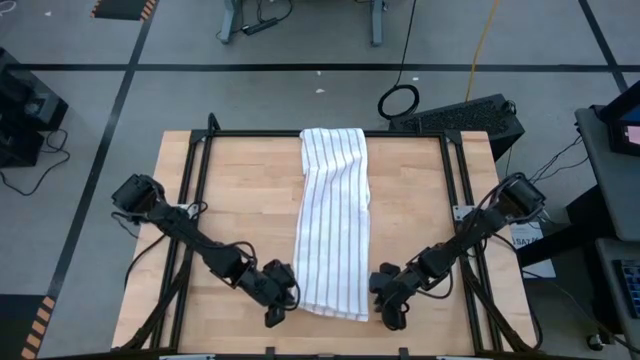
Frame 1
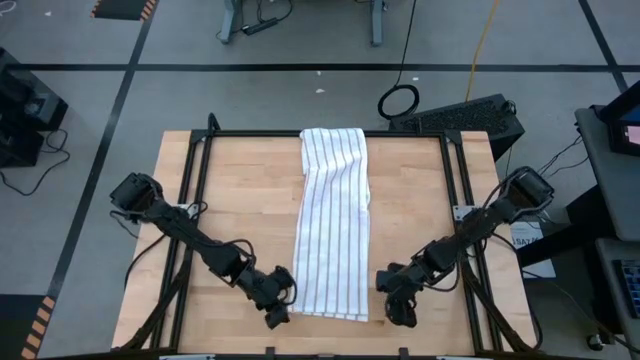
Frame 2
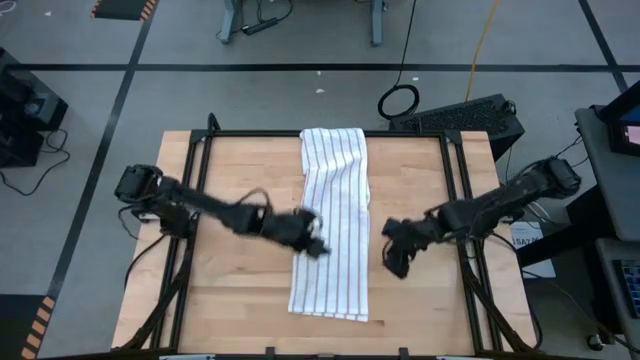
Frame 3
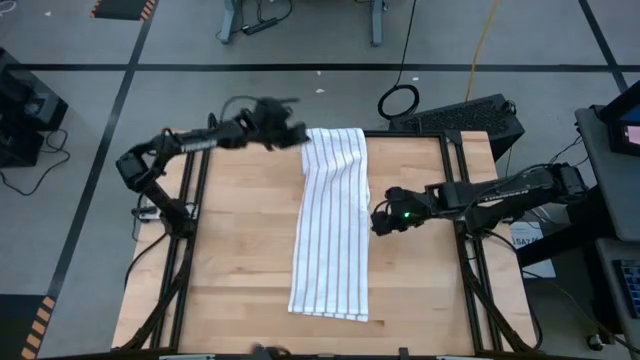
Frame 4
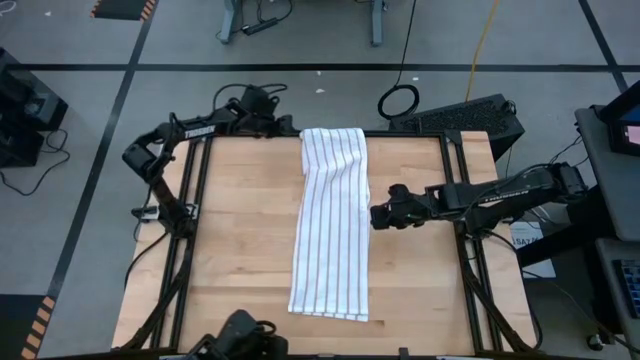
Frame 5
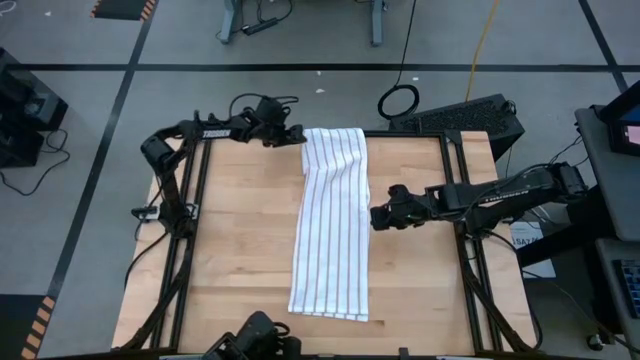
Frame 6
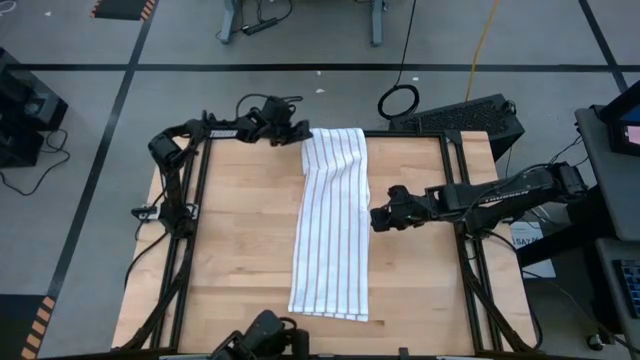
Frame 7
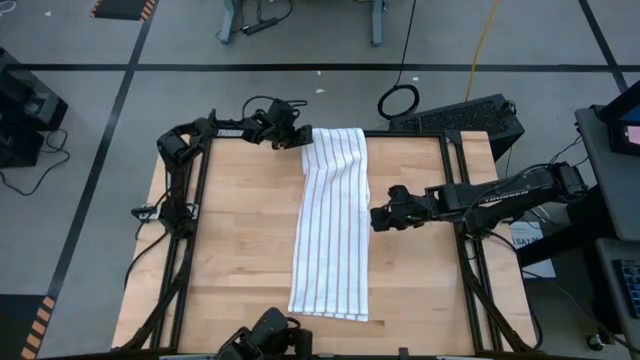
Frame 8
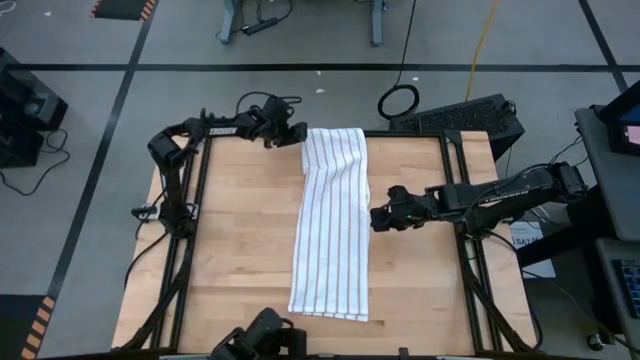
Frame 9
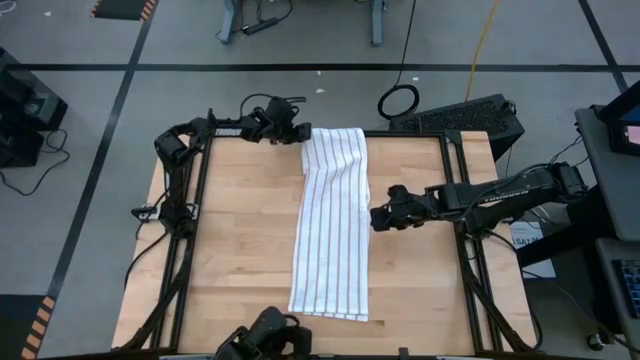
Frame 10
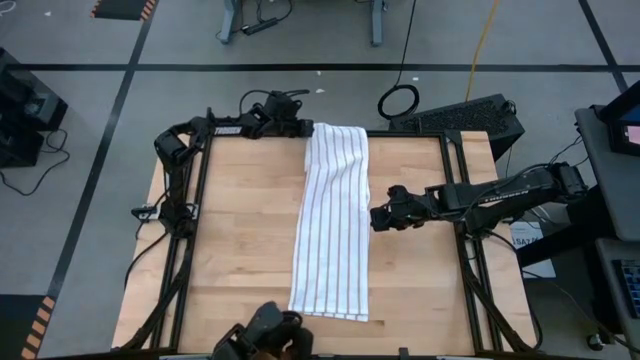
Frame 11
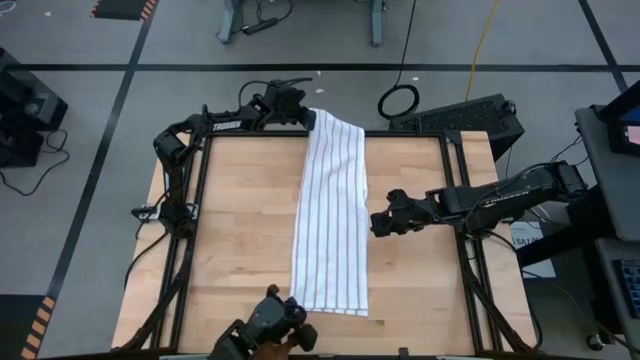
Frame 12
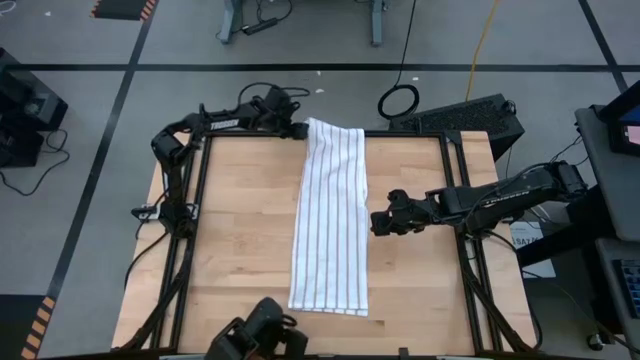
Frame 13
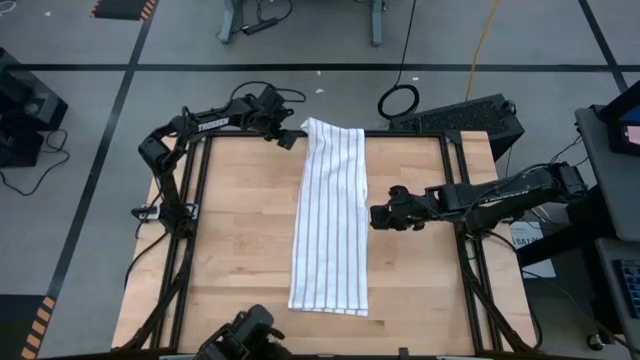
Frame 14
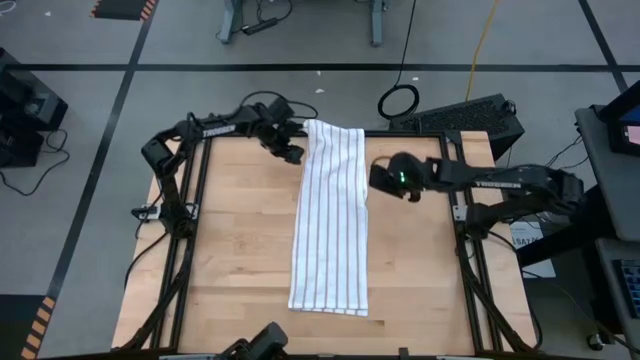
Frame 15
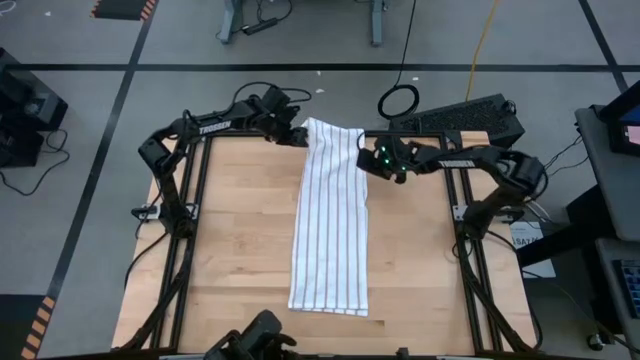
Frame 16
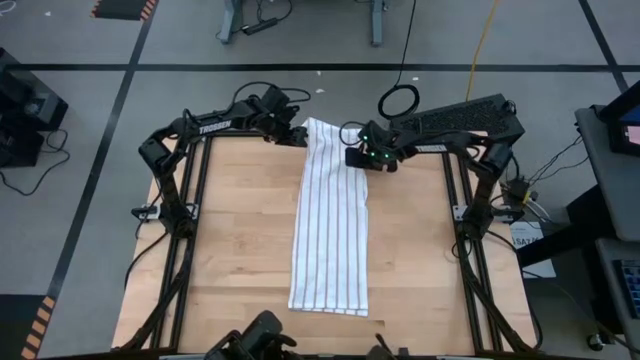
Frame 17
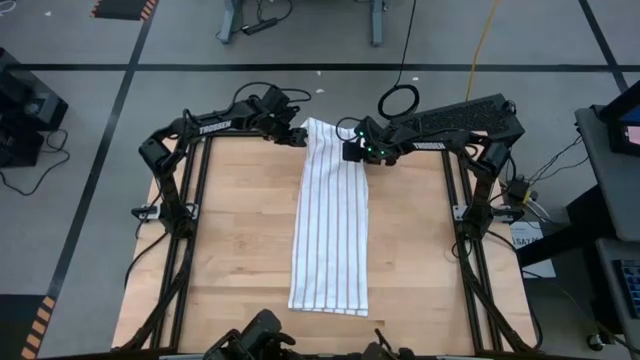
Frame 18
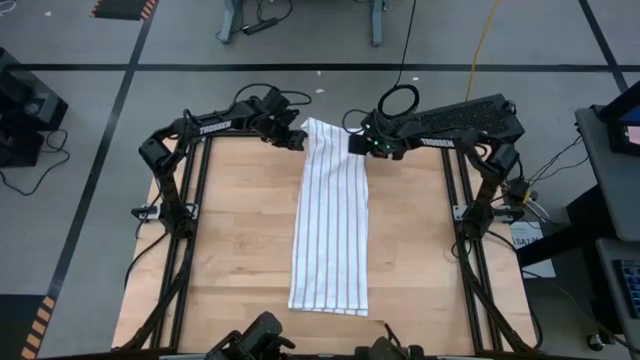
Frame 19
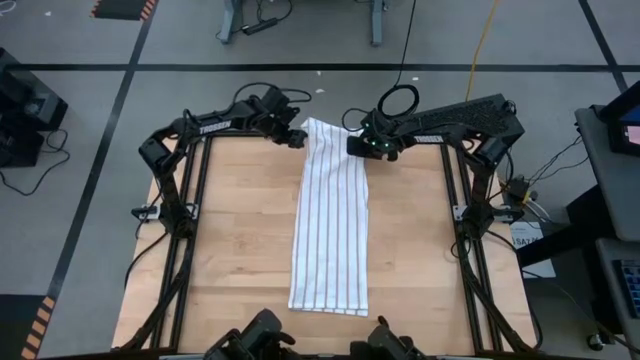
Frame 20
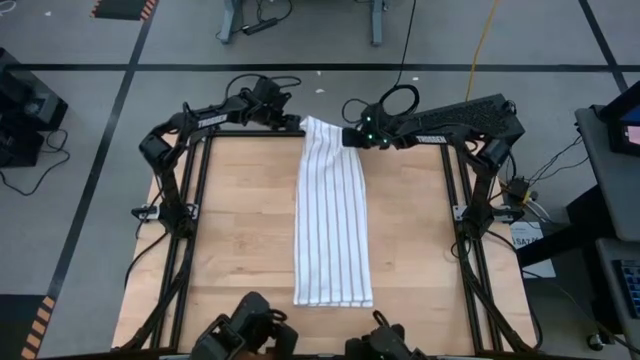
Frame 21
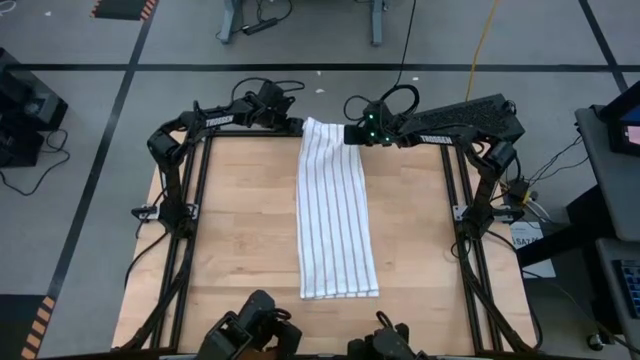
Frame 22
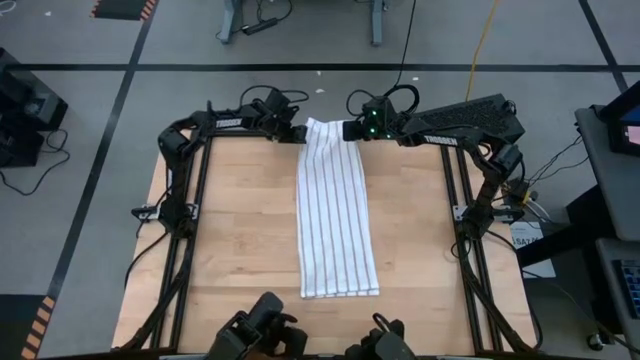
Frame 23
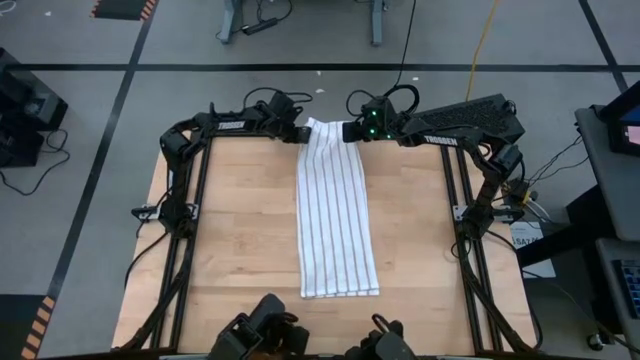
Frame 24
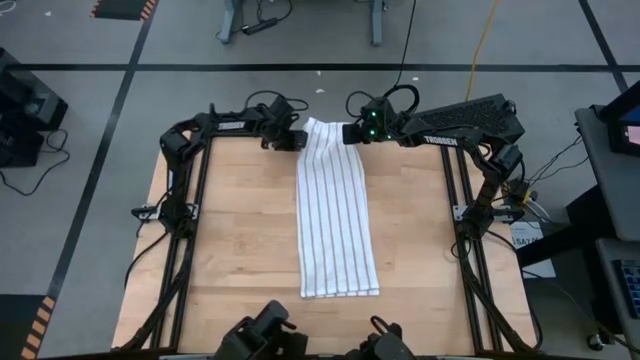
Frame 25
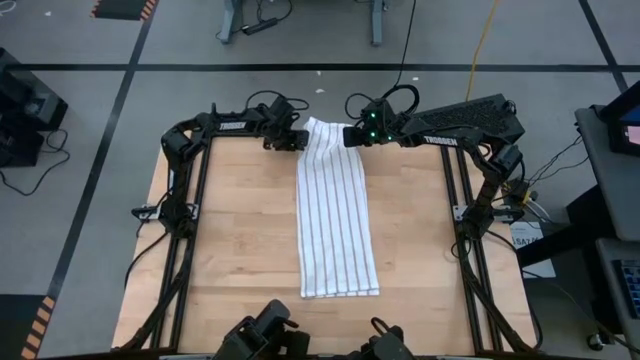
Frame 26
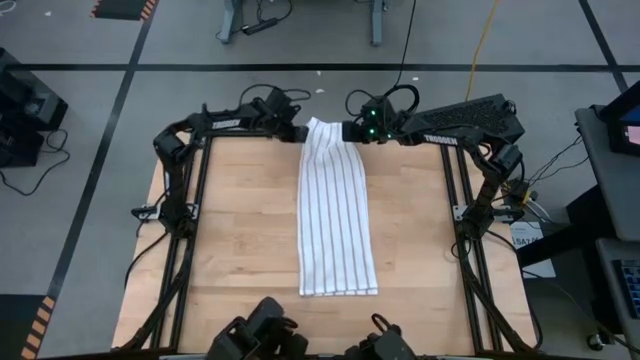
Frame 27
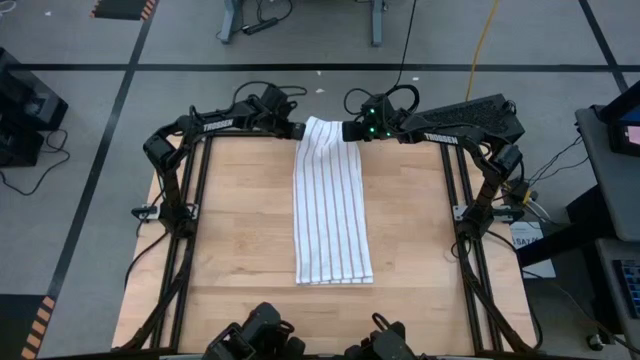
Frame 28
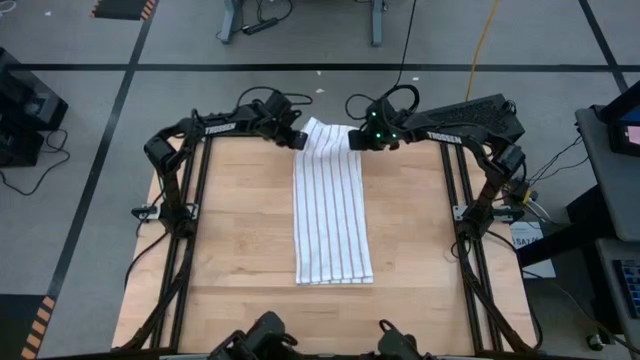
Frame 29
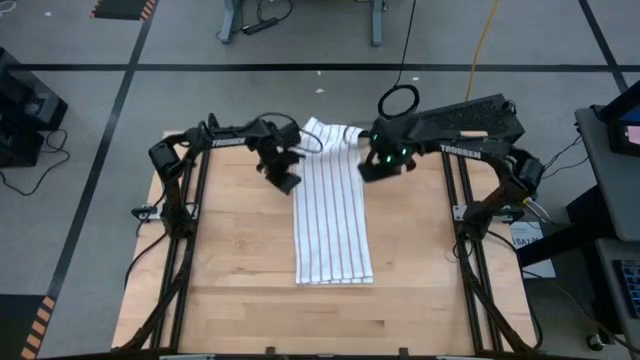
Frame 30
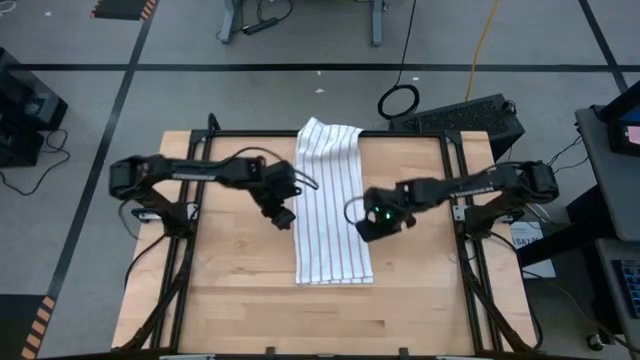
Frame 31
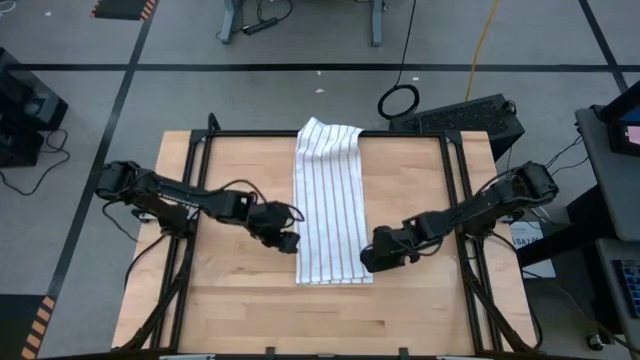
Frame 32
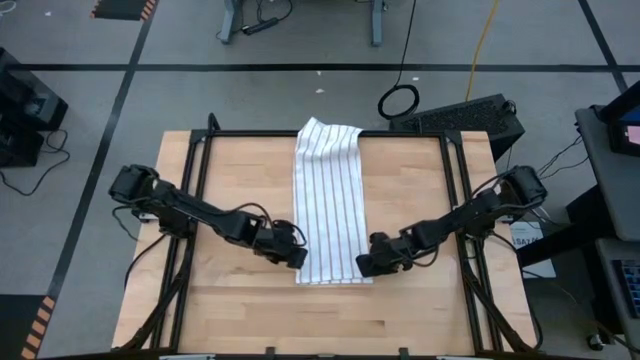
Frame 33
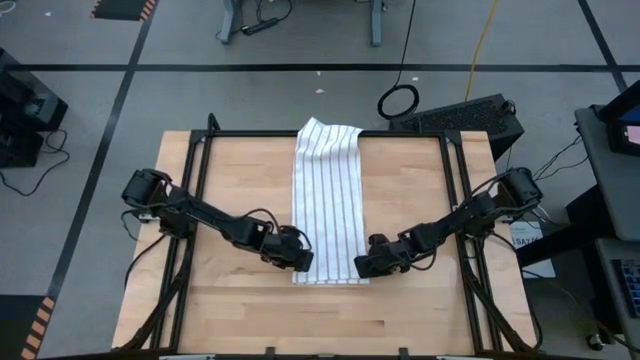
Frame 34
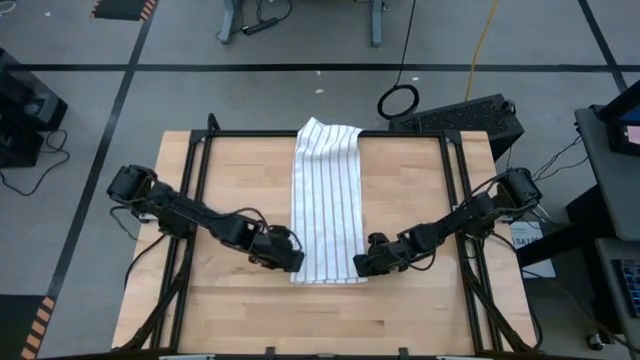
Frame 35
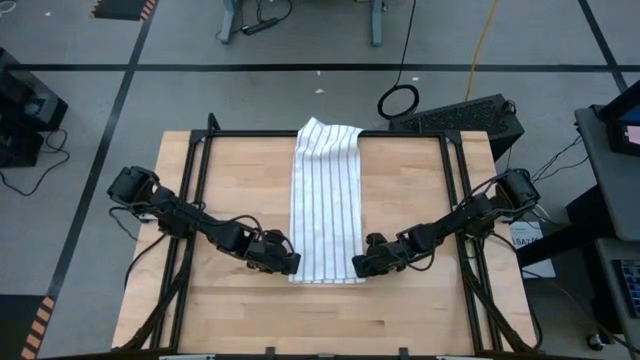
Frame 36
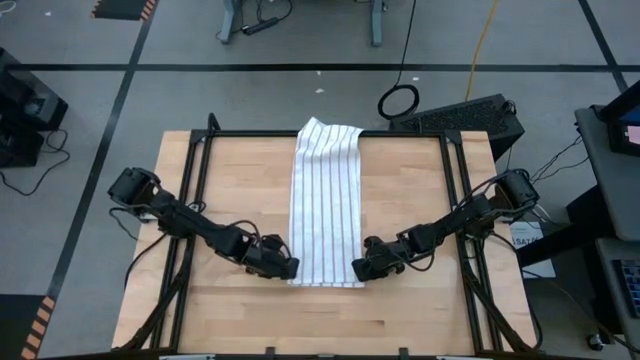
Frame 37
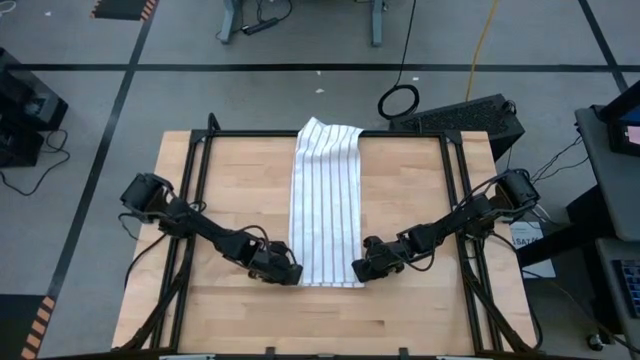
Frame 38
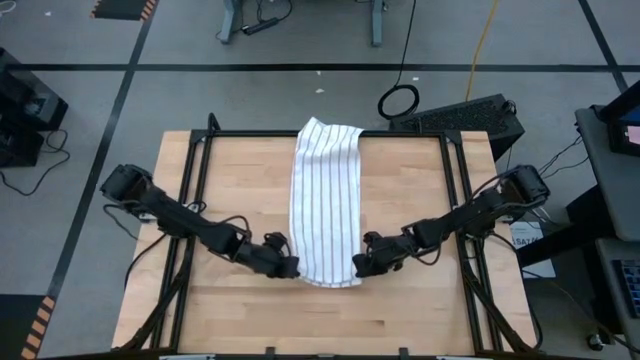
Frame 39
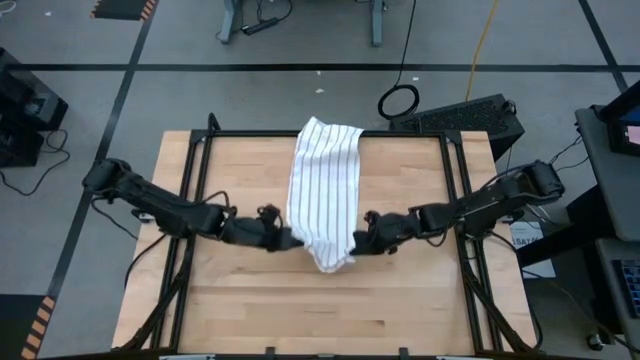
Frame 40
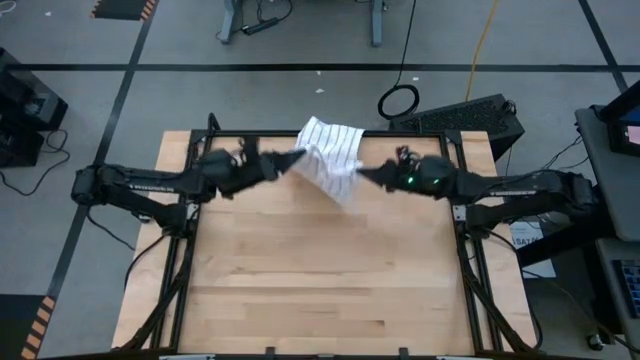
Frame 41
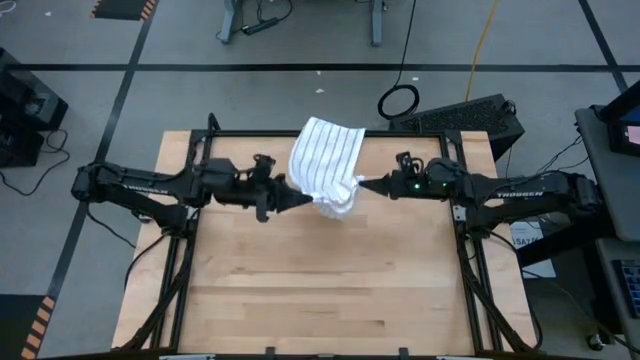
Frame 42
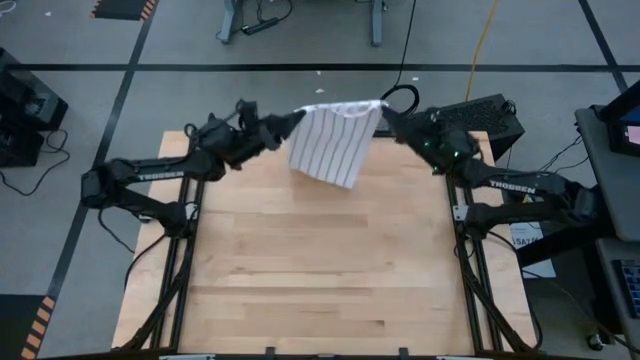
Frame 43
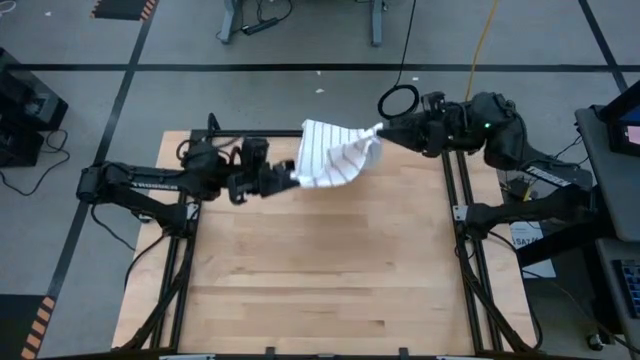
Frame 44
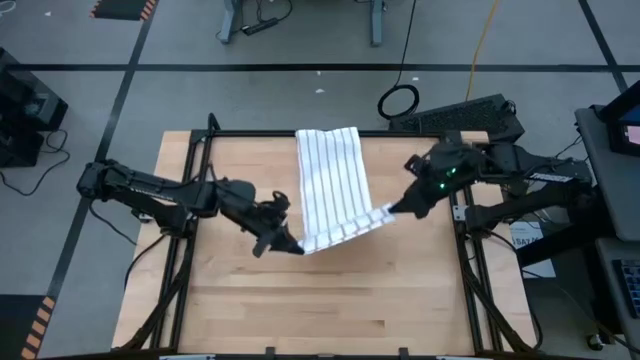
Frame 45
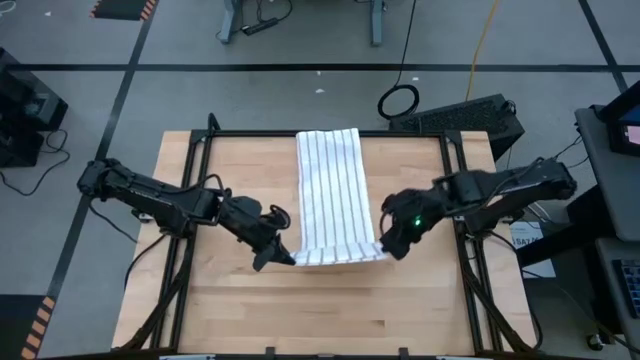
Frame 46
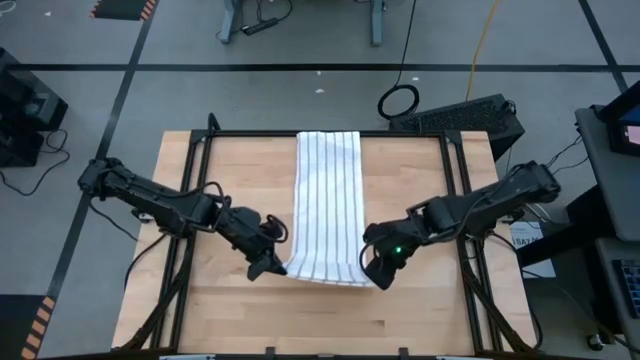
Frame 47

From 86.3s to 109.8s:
Task: Roll towel into tight, uniform cylinder
Fold the white brown kitchen towel
